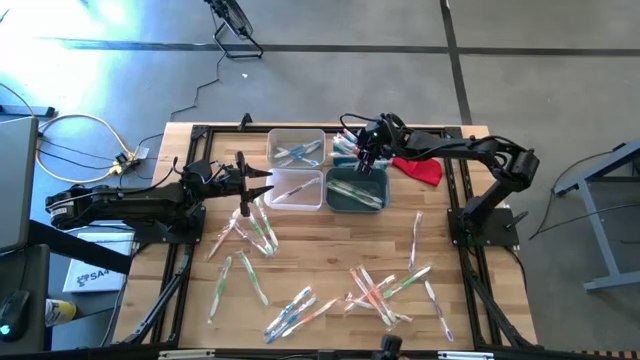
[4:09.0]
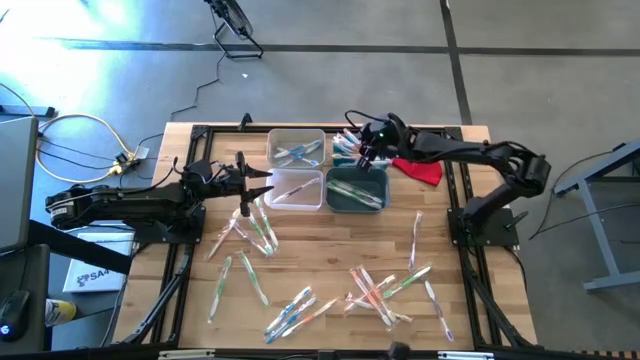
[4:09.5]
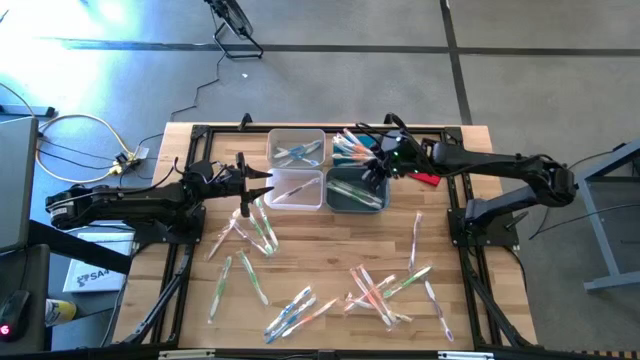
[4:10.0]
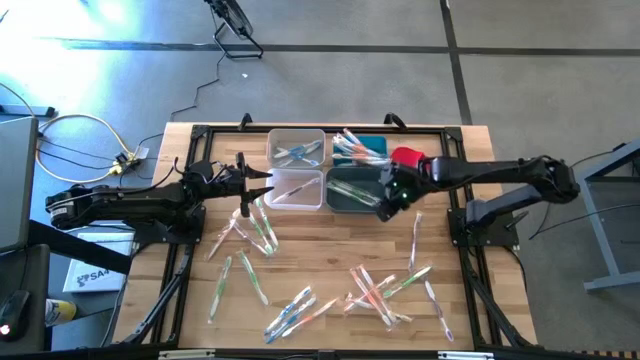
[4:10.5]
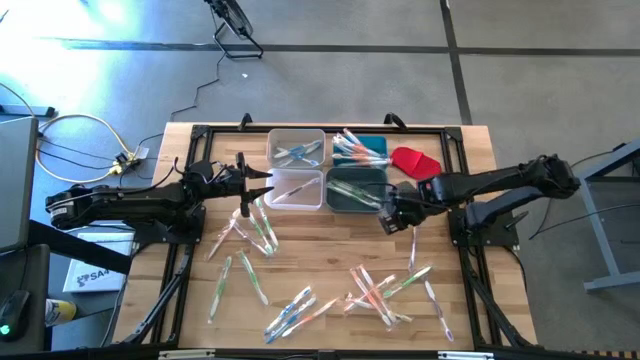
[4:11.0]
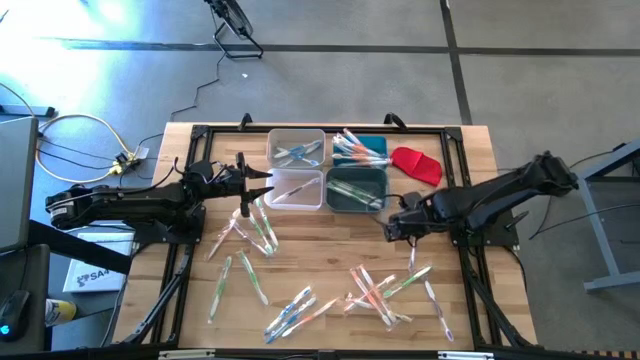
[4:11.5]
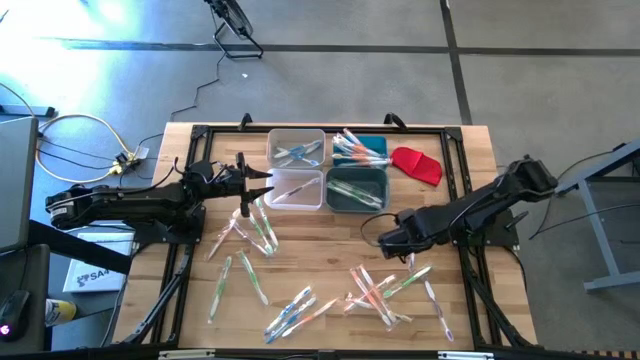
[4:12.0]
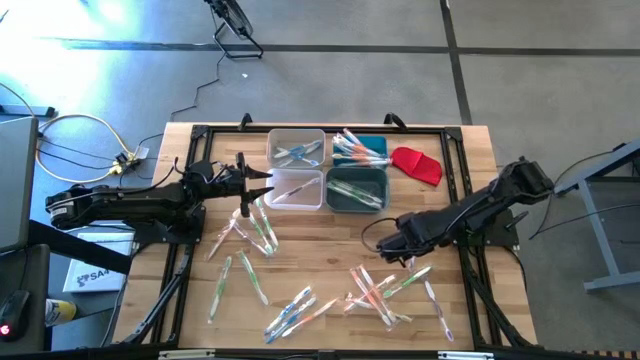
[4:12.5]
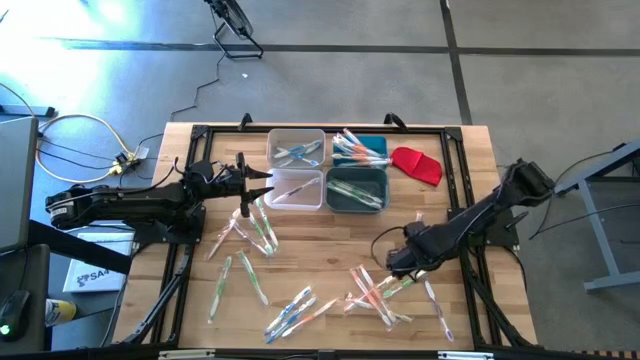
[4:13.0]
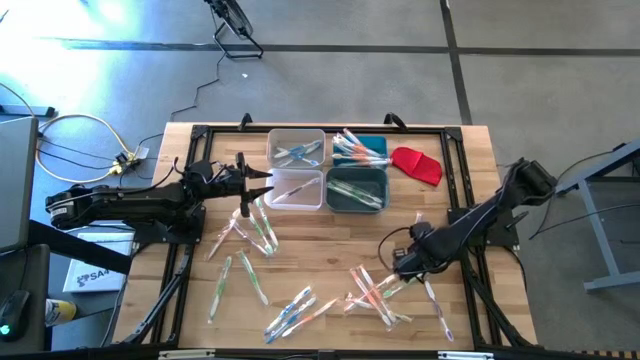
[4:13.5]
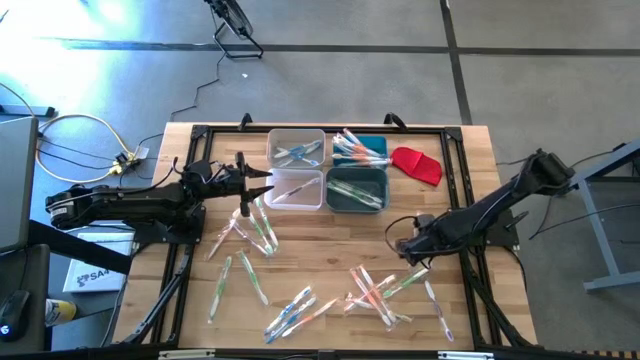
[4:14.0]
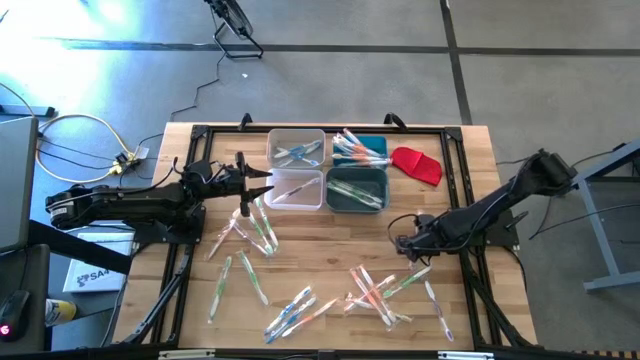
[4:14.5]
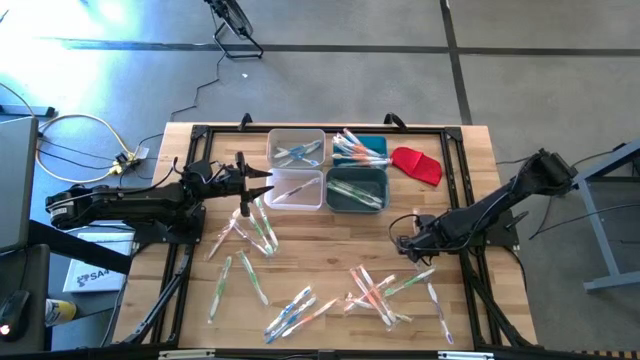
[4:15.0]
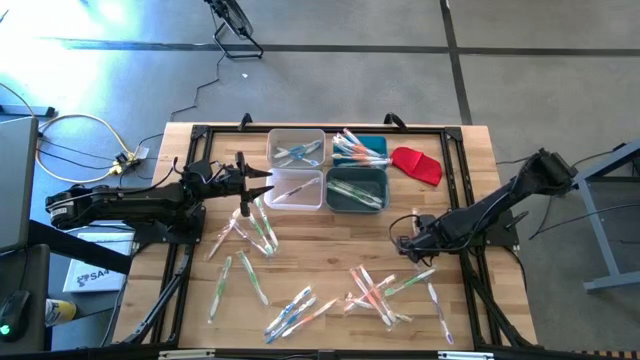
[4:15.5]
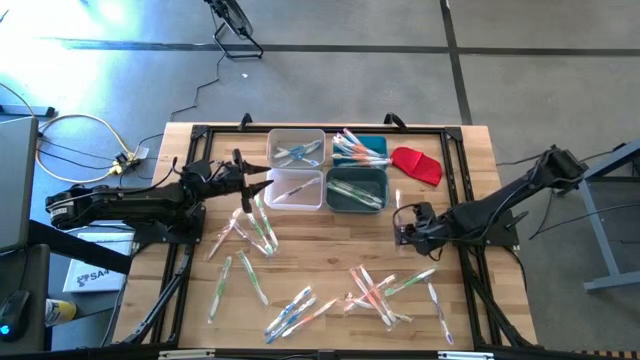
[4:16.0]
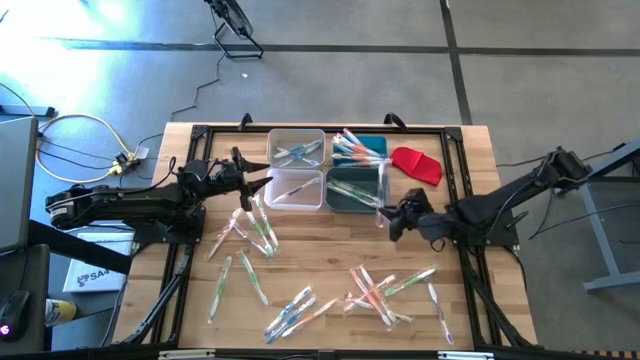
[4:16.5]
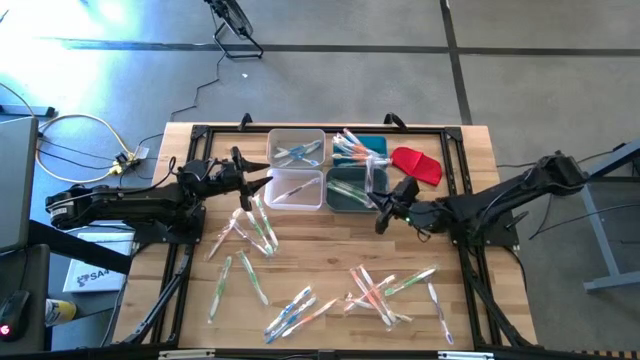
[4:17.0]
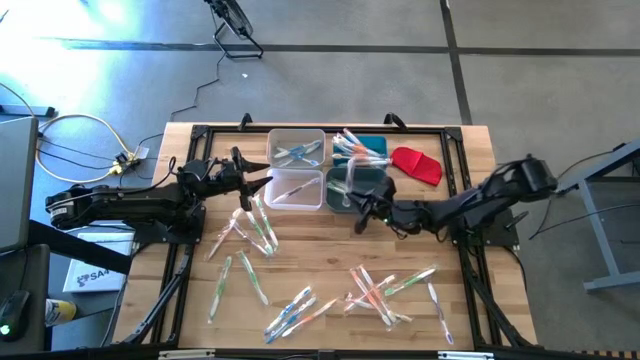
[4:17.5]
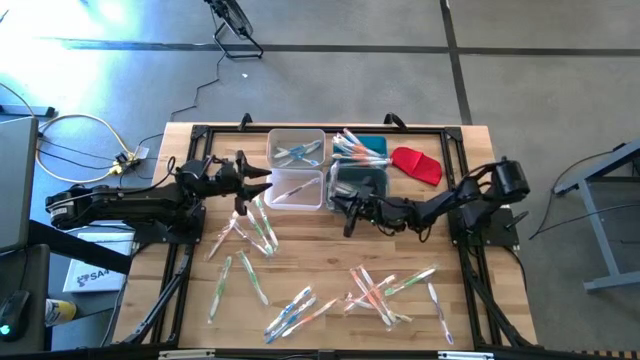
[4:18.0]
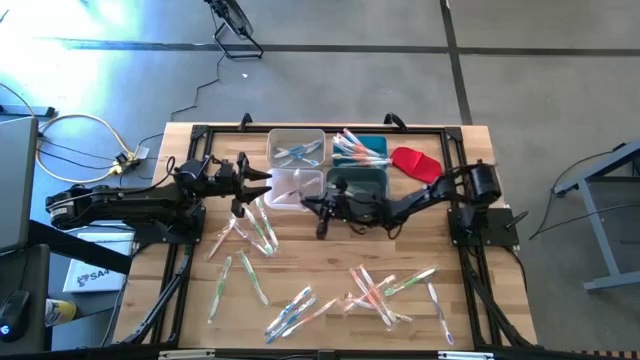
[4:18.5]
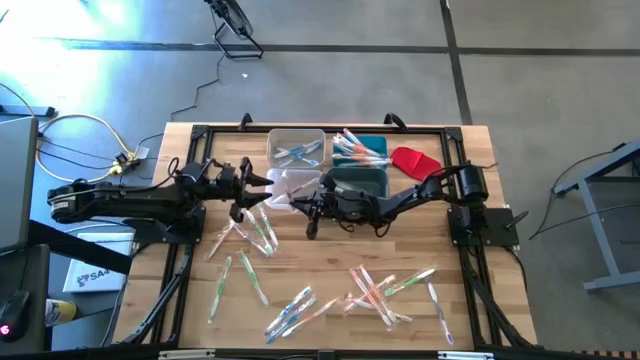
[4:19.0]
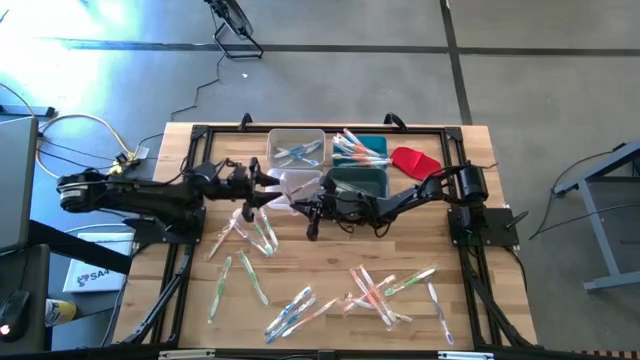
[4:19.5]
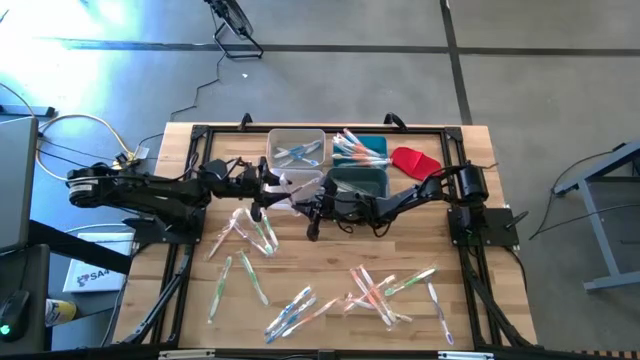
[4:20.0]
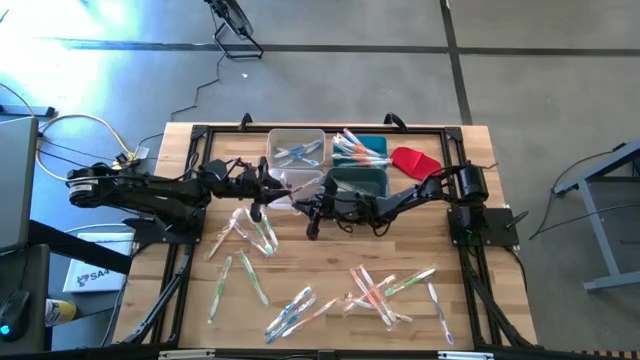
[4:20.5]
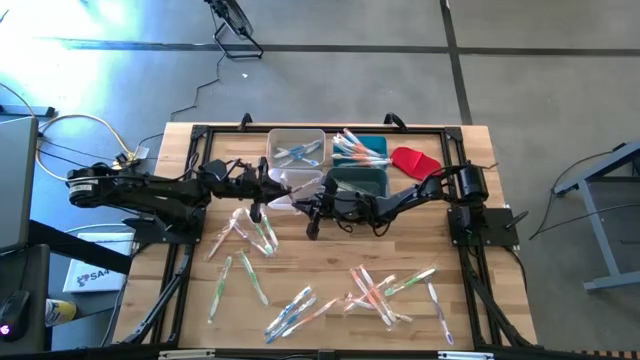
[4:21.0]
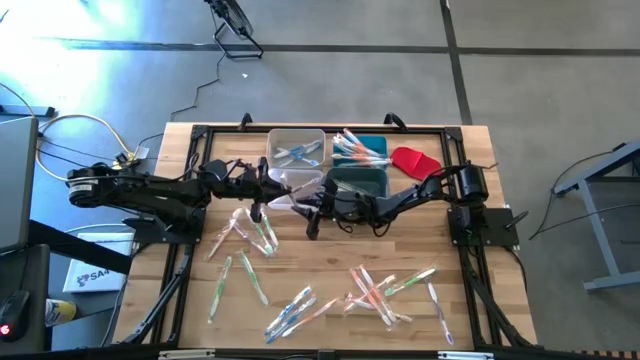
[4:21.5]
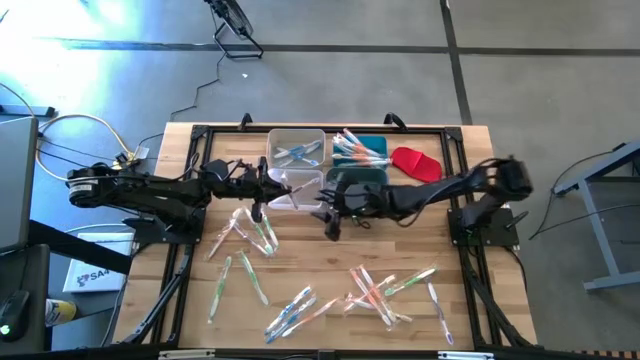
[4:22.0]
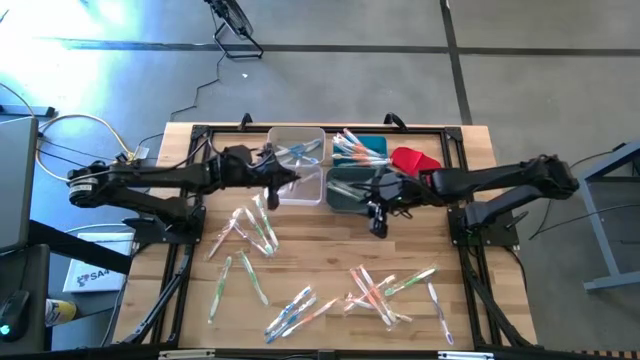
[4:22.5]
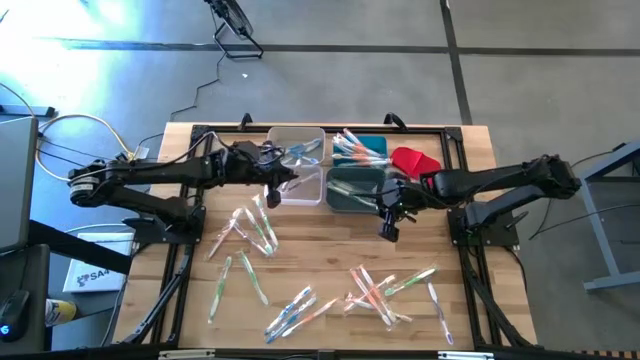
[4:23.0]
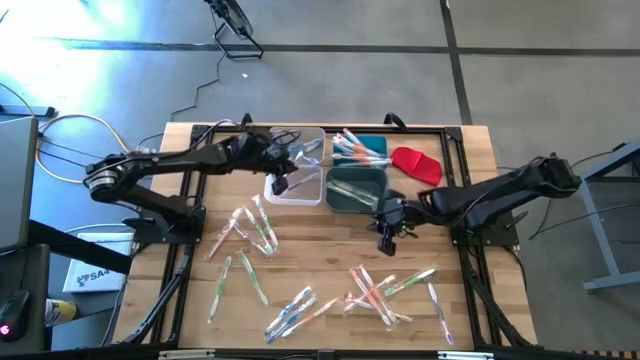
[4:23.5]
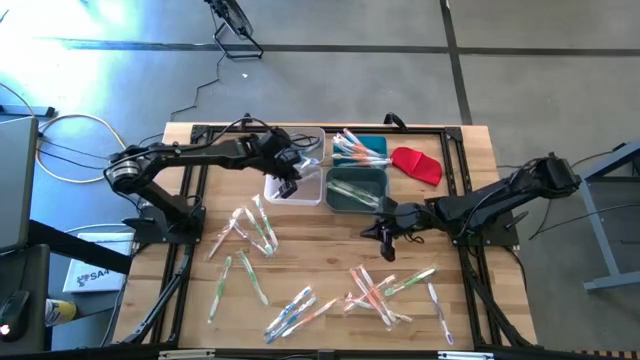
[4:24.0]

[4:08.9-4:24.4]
Task: Pick & Place Toothbrushes
Put the purple toothbrush into the transparent bin

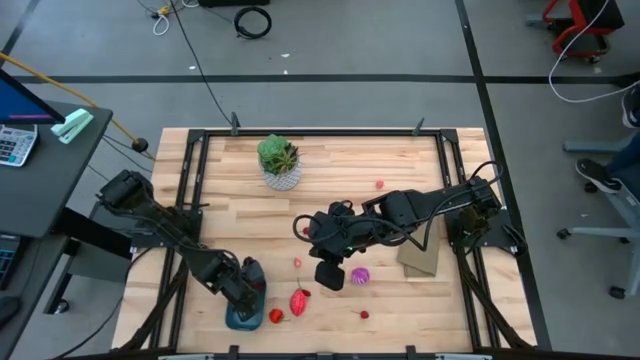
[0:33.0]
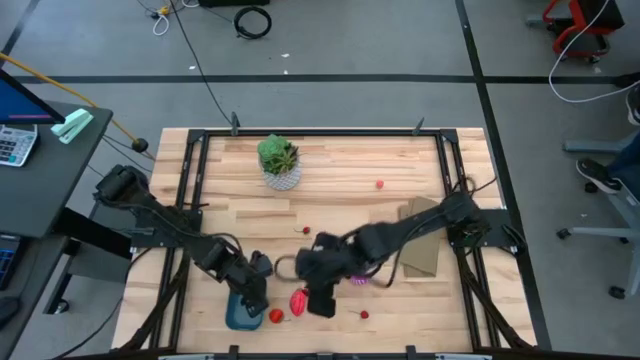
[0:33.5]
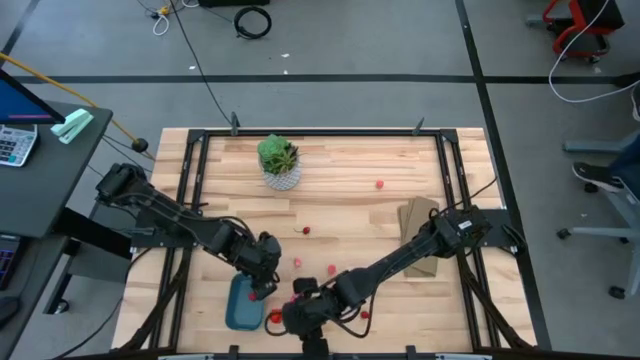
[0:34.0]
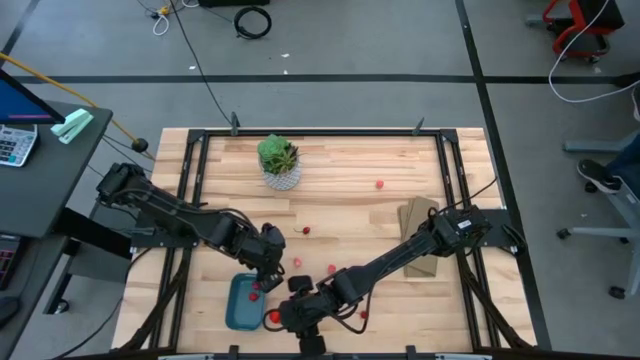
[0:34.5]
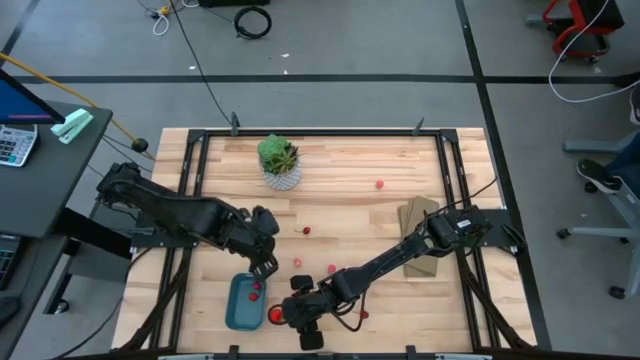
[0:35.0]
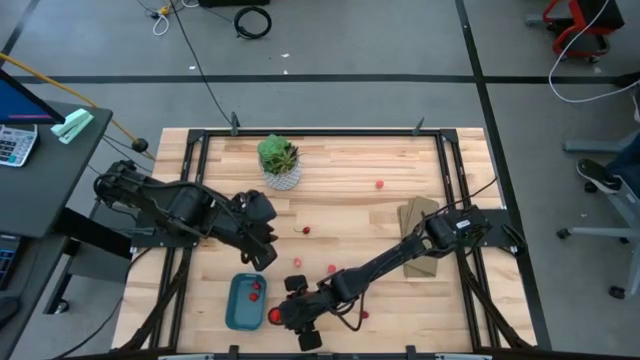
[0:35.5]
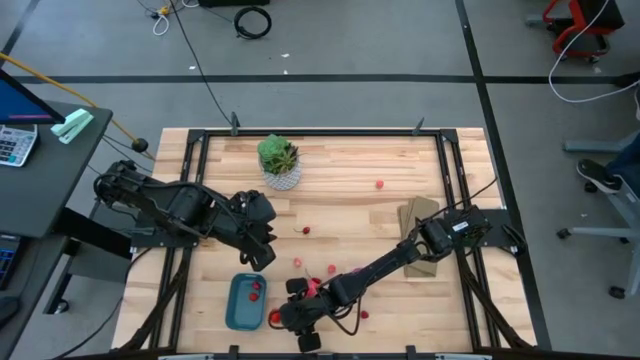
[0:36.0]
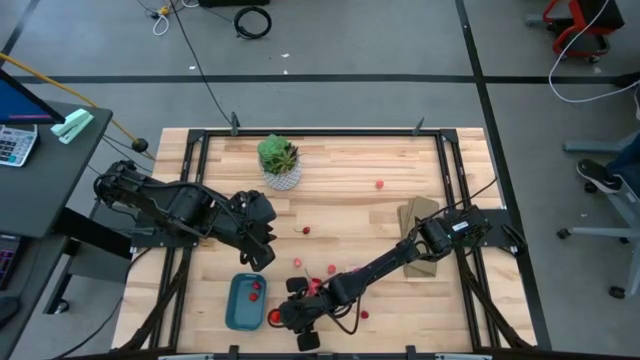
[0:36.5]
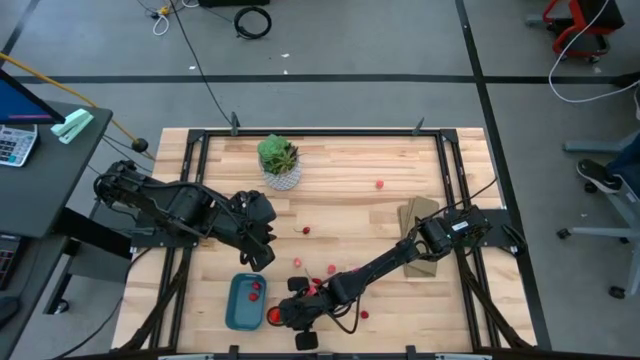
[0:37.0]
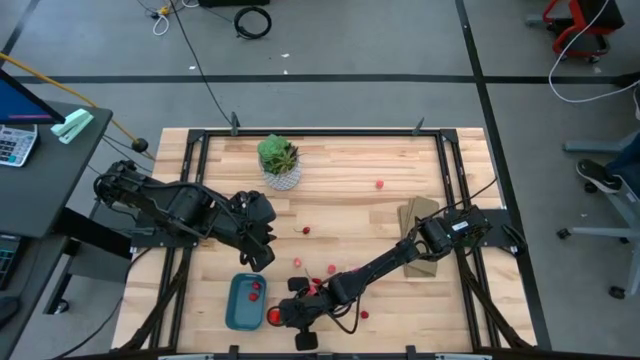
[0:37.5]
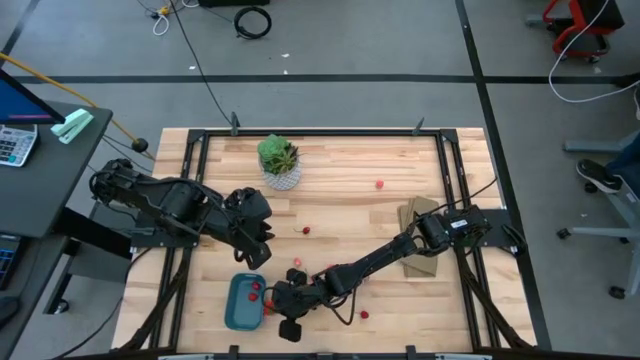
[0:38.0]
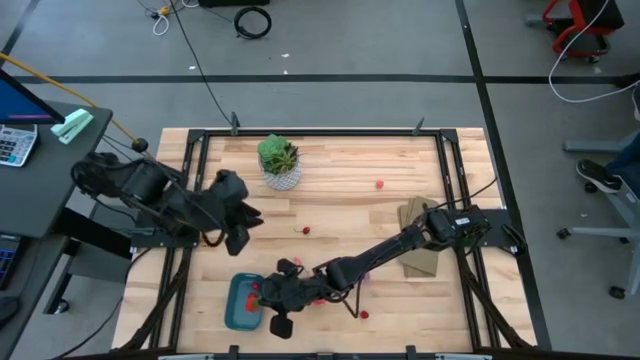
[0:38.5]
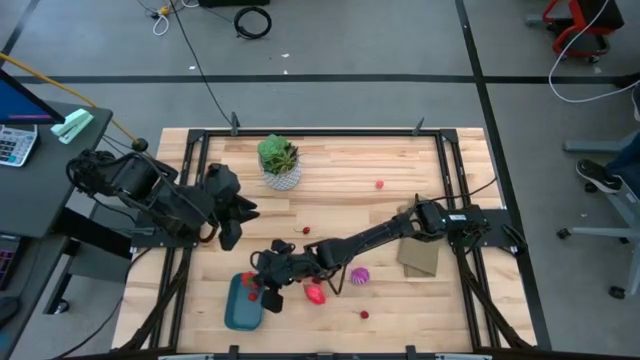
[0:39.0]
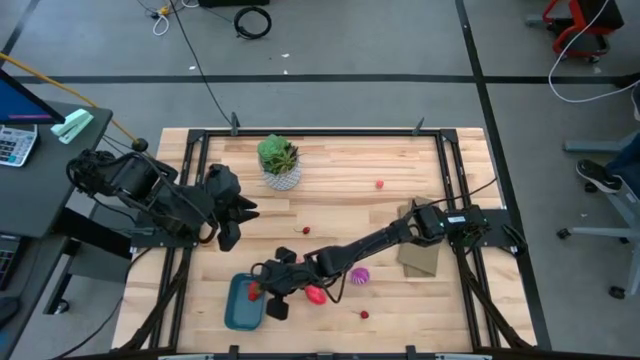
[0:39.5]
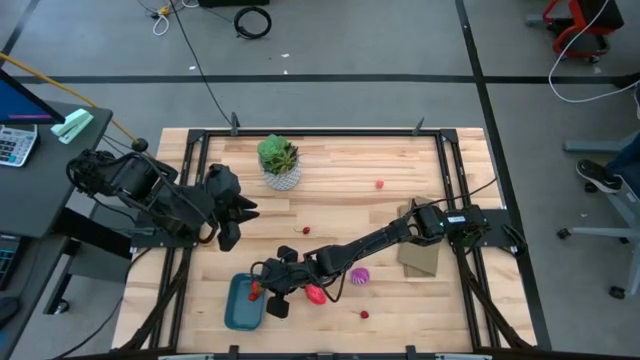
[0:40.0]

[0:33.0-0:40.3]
Task: Pick and placing Produce into tupperware
Put the strawberry into the bin
